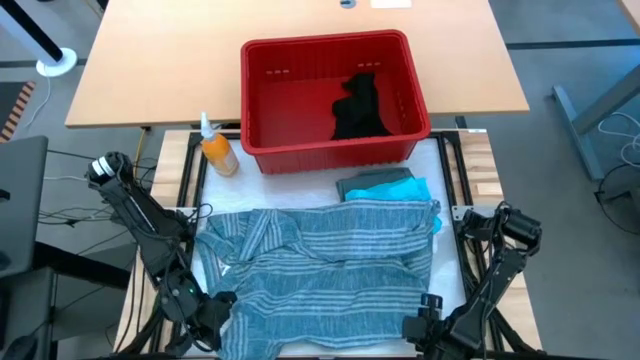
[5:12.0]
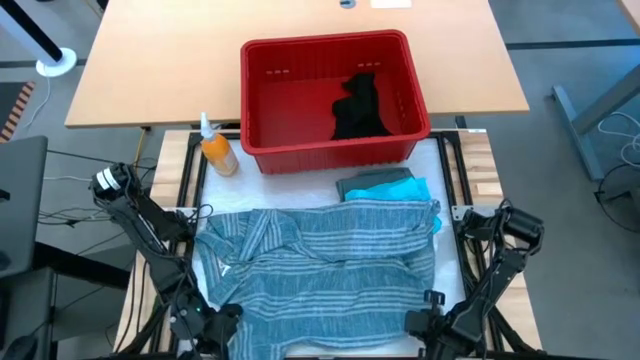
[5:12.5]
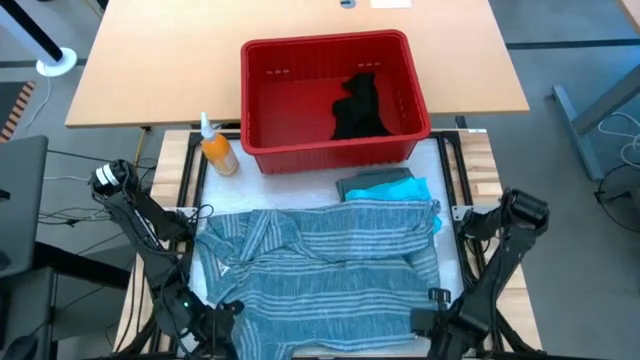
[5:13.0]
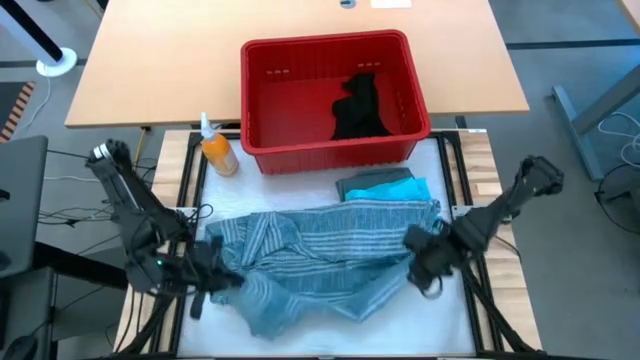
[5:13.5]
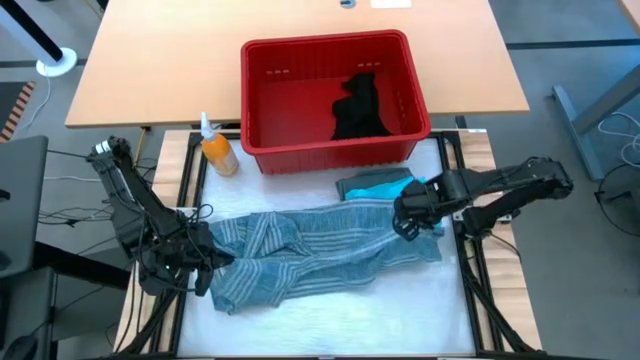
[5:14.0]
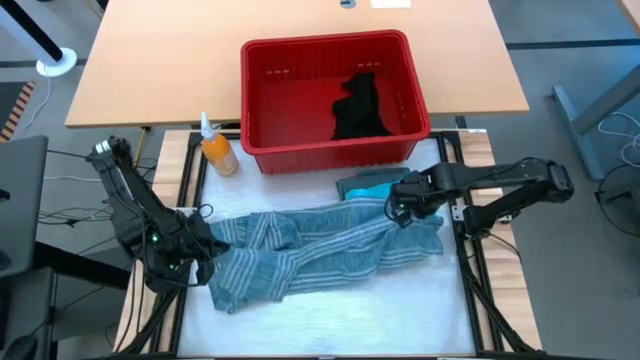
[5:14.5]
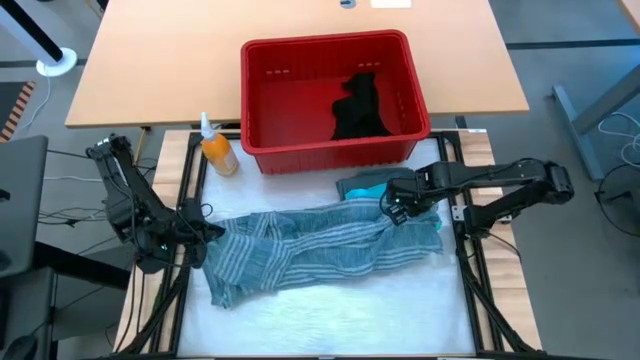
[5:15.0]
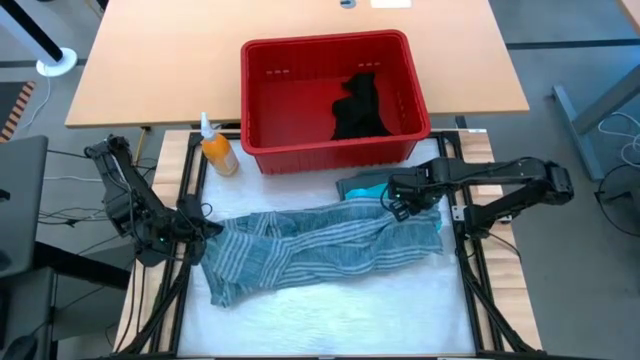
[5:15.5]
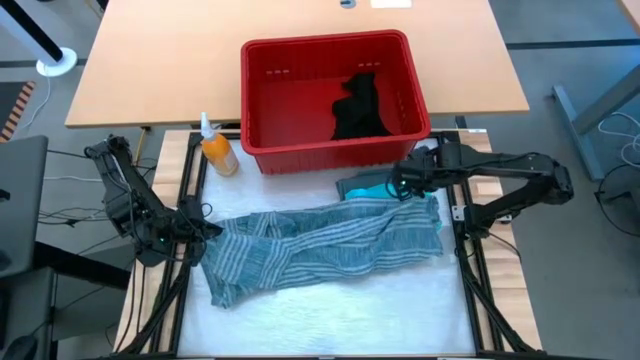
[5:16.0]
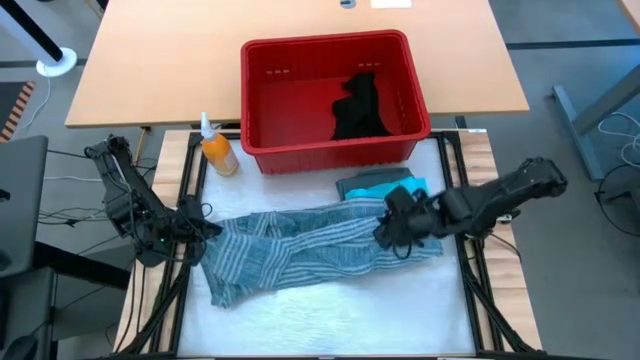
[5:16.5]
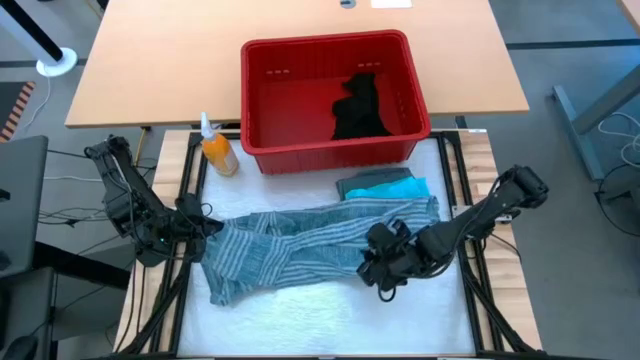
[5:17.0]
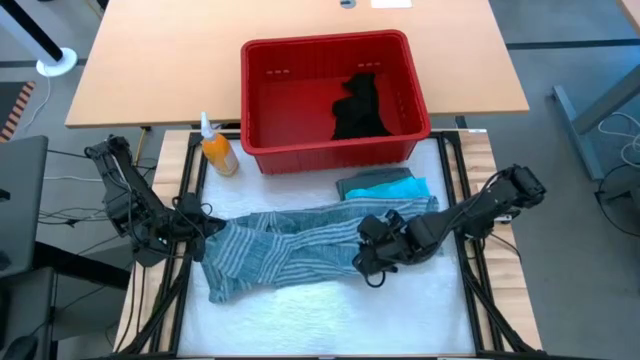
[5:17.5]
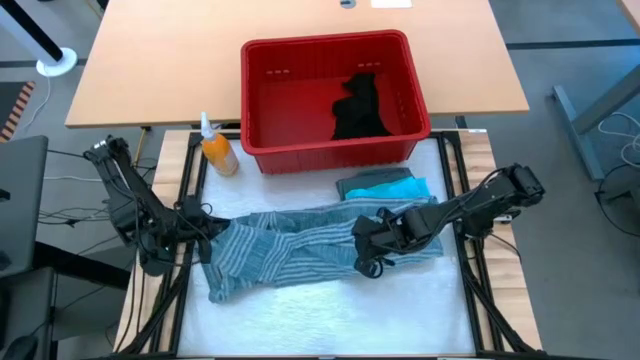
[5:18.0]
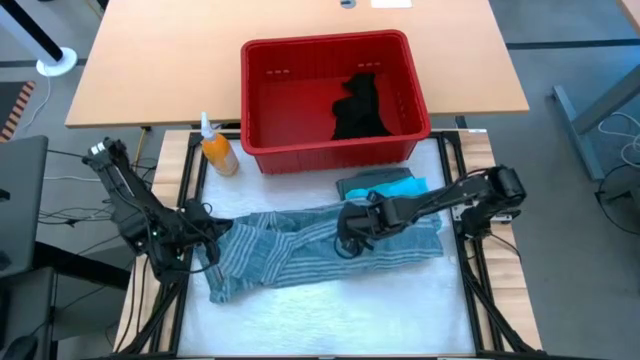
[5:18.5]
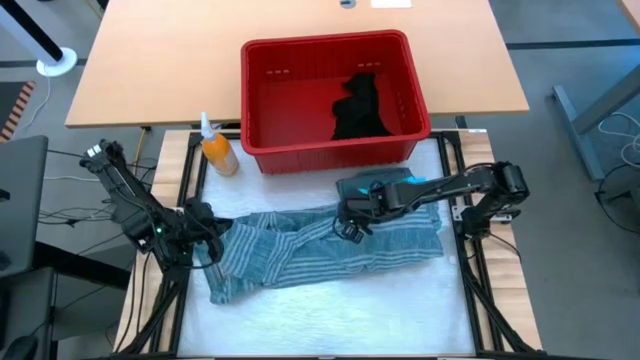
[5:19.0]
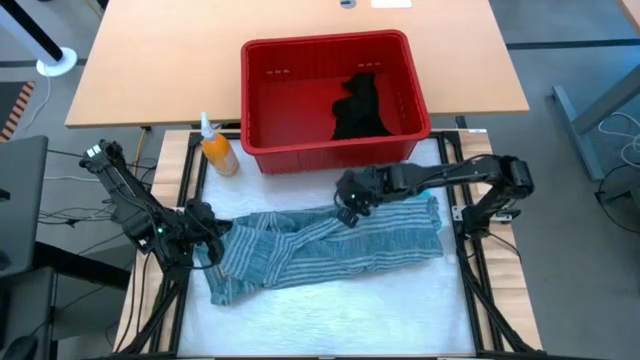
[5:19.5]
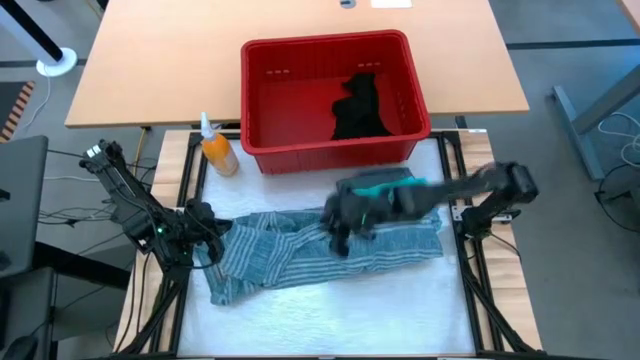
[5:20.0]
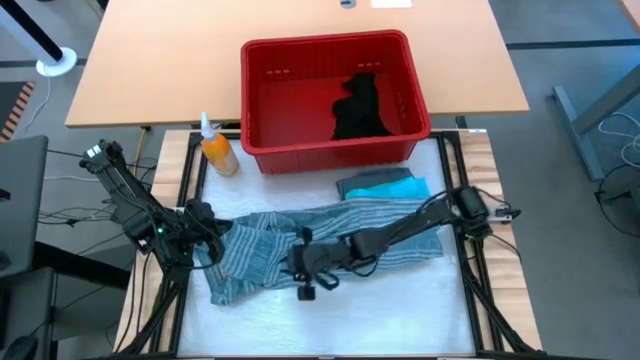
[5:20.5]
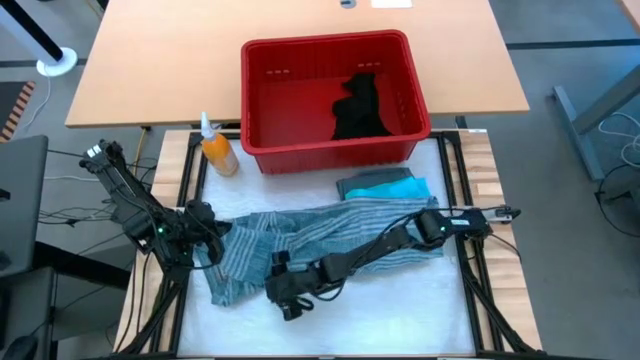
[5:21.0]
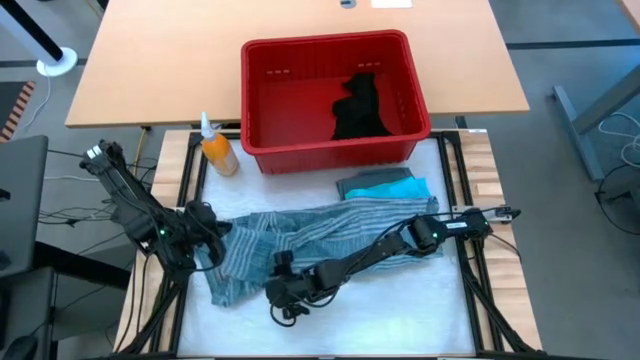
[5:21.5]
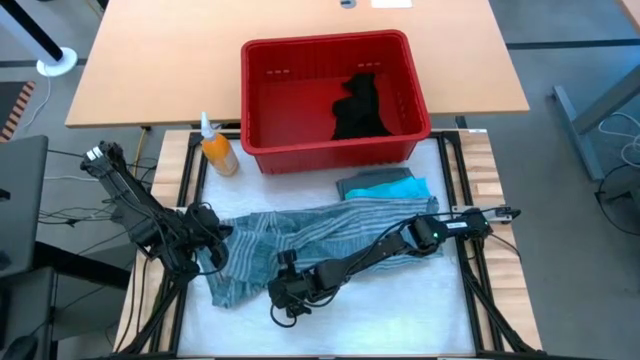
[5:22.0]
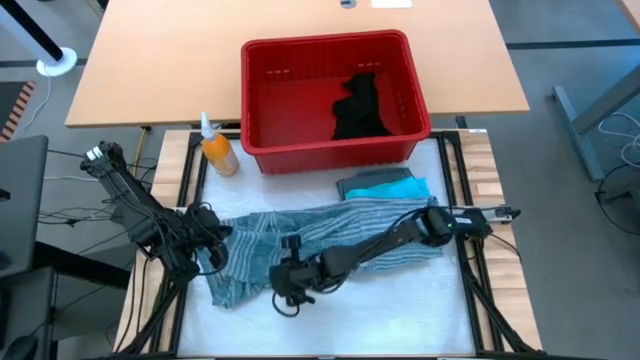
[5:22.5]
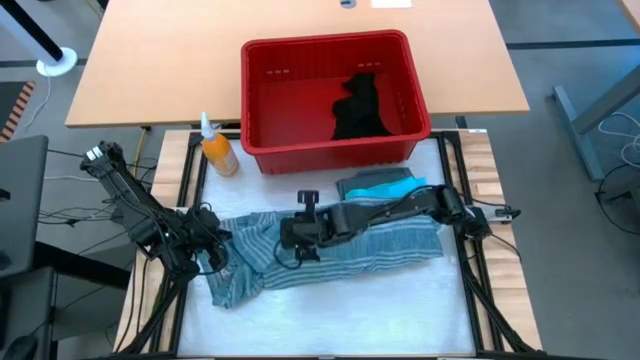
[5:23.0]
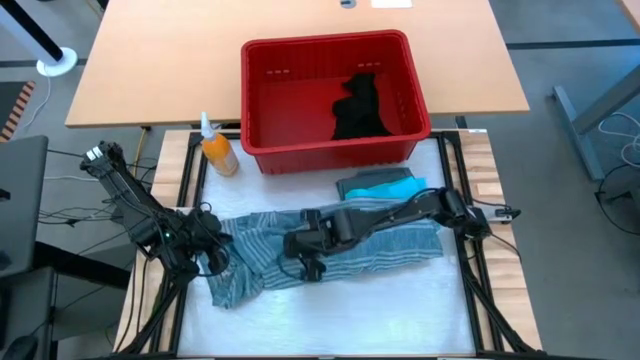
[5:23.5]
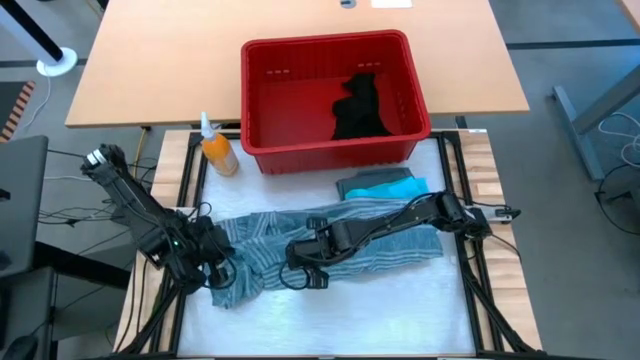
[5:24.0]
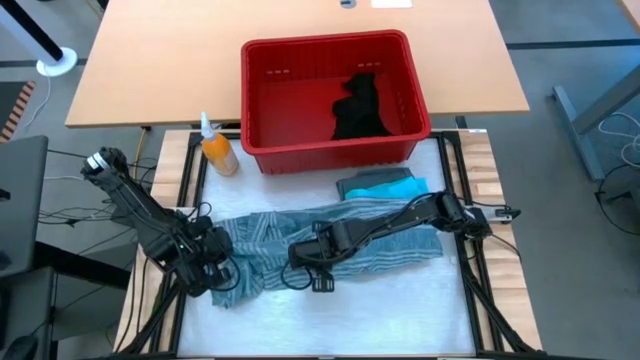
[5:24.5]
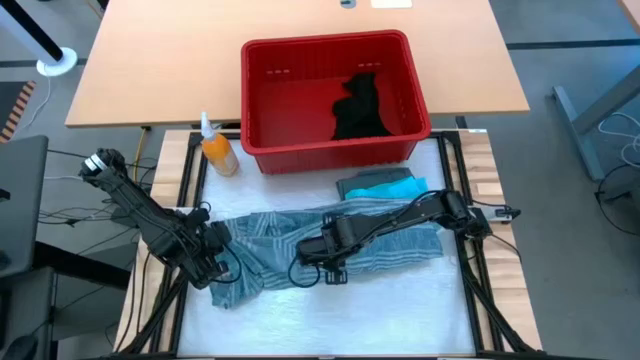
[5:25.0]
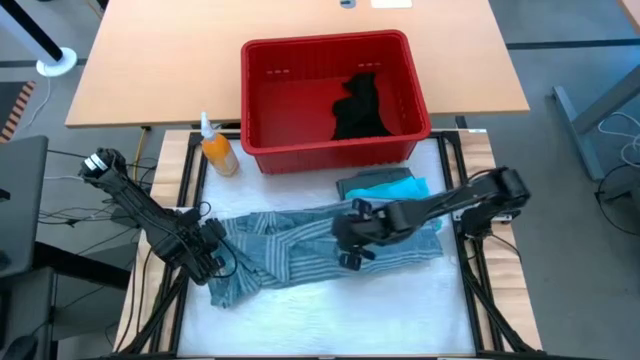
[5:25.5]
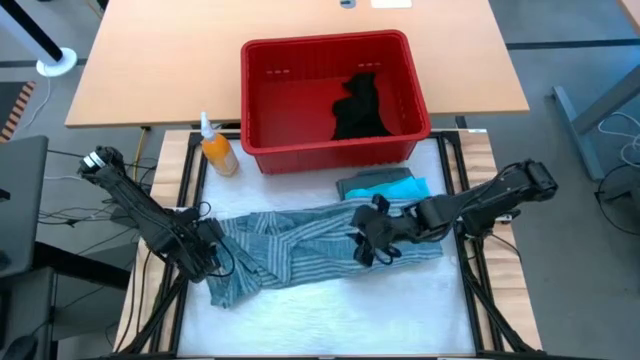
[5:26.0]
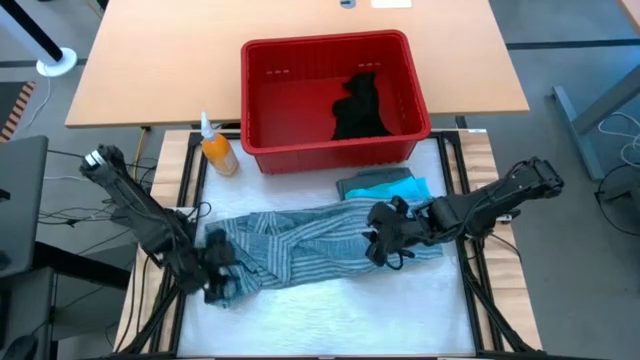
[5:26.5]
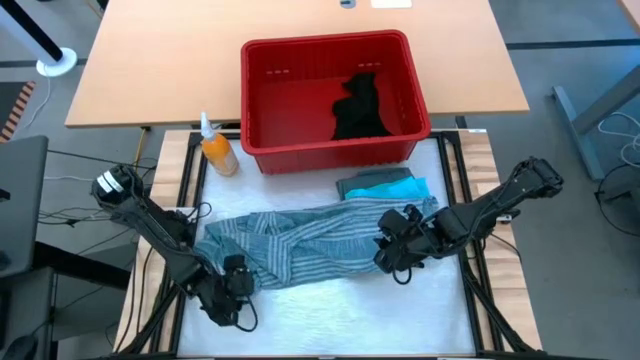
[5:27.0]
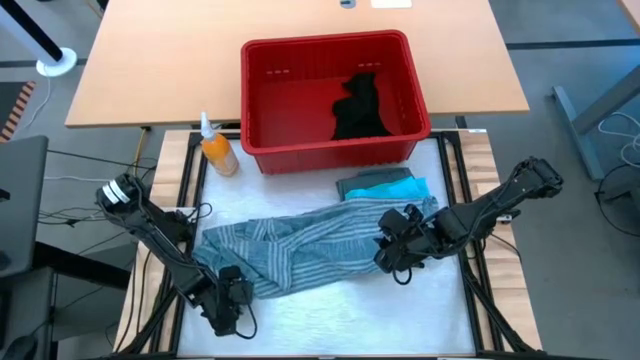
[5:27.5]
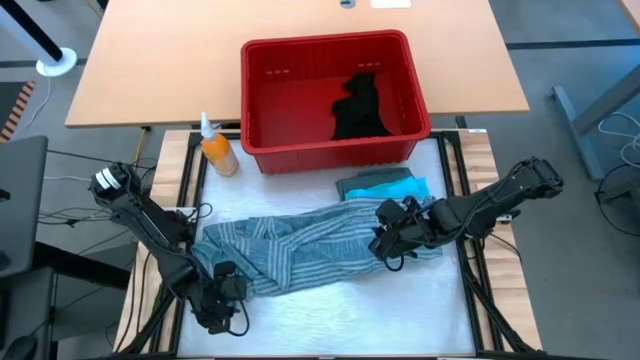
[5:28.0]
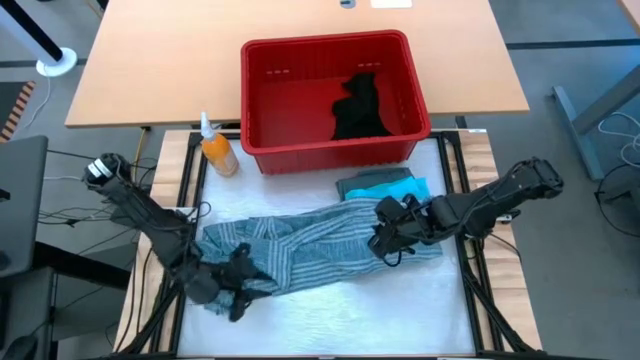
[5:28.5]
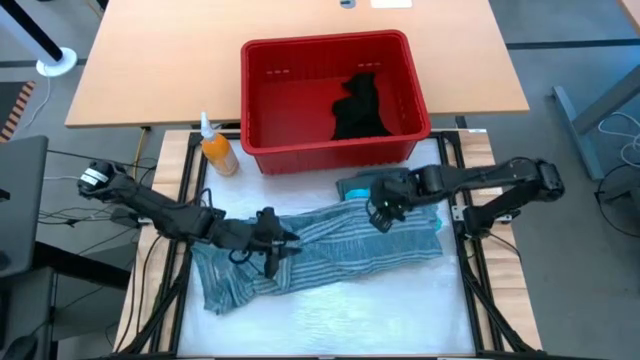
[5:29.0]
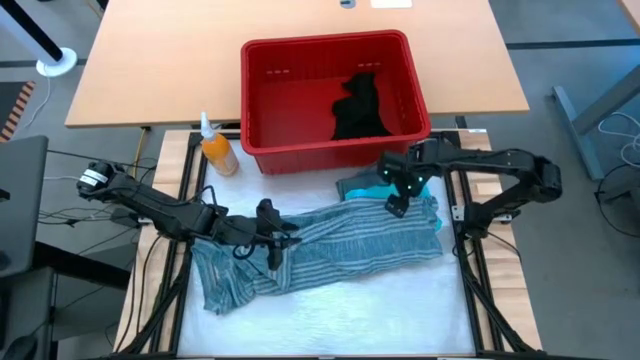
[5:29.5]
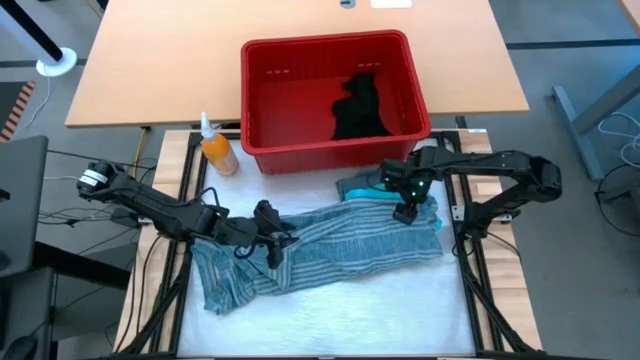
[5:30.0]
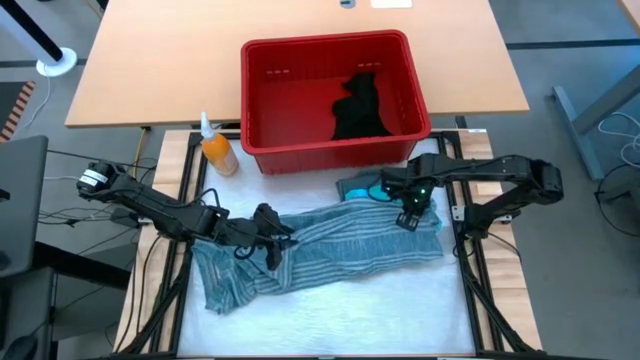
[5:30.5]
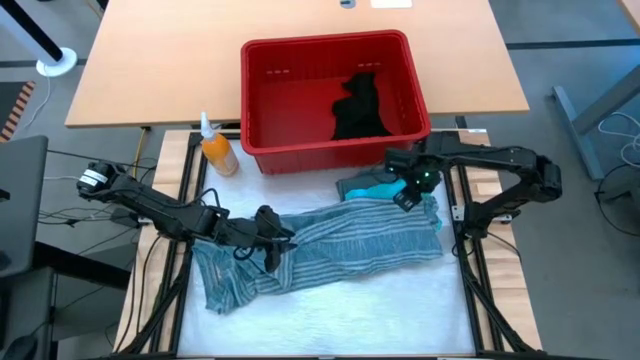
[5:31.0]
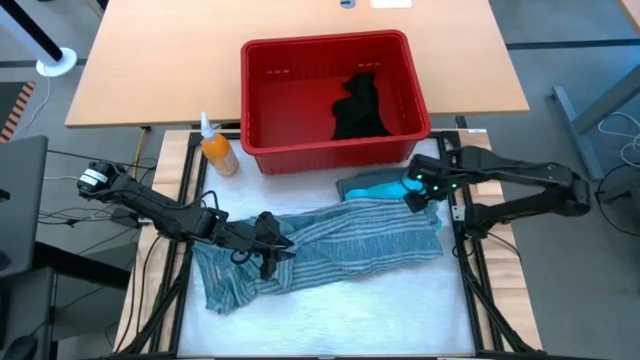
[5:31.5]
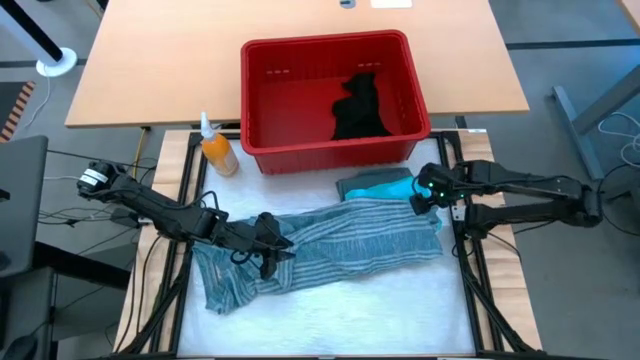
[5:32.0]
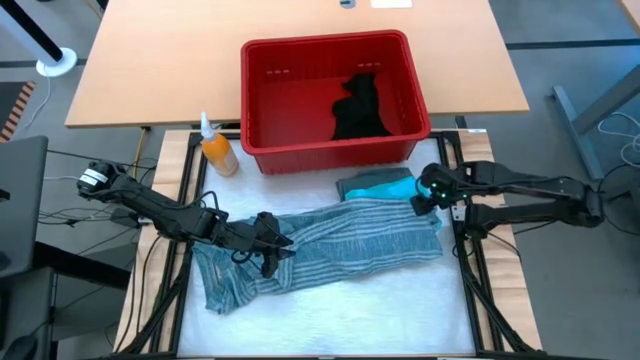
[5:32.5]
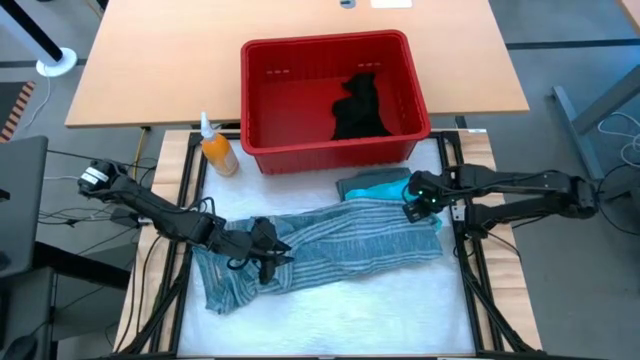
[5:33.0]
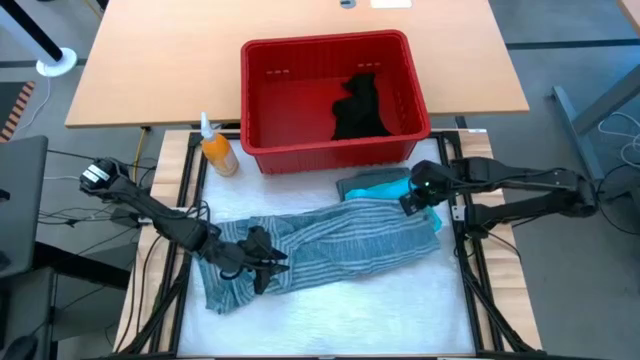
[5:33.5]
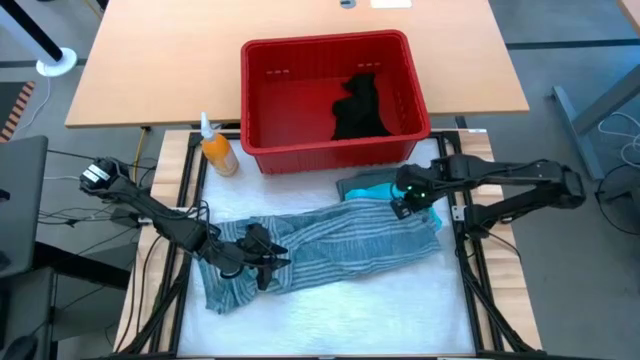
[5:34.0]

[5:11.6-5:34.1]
Task: Fold Laundry from Bin
Fold the blue patterned polo shirt
